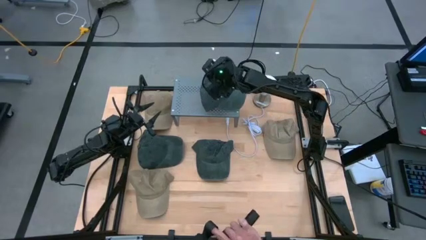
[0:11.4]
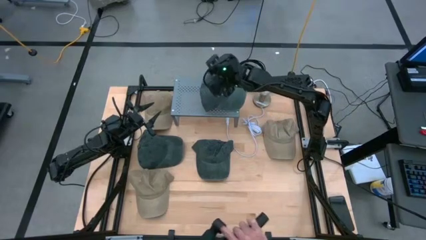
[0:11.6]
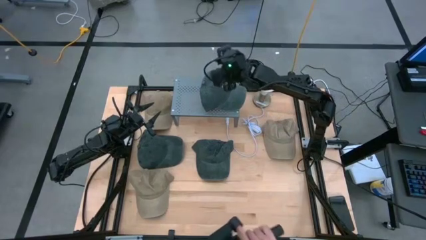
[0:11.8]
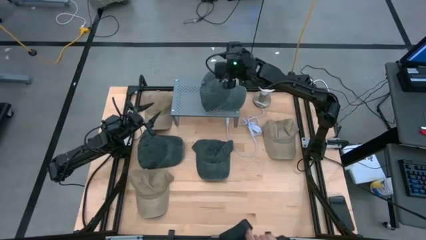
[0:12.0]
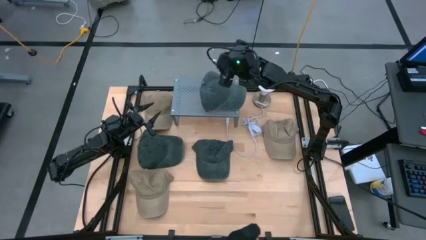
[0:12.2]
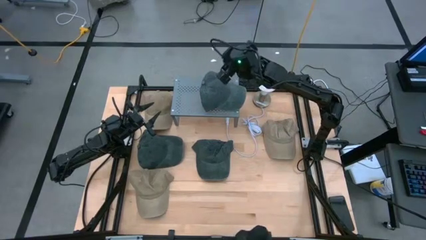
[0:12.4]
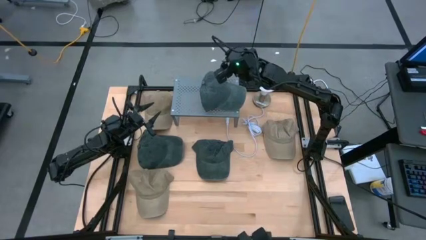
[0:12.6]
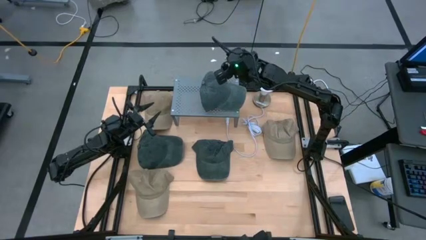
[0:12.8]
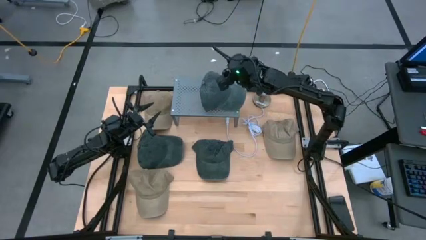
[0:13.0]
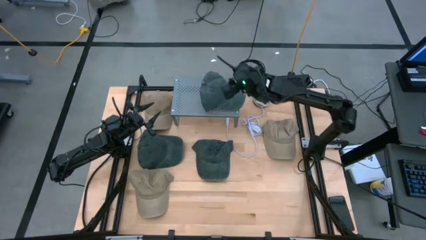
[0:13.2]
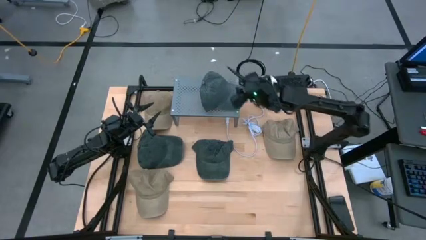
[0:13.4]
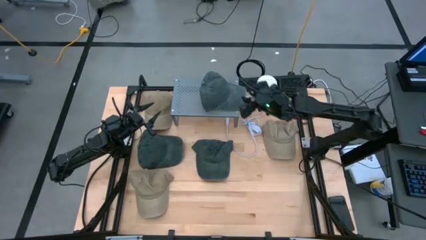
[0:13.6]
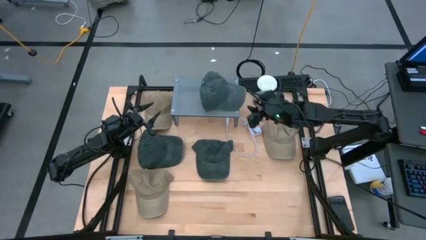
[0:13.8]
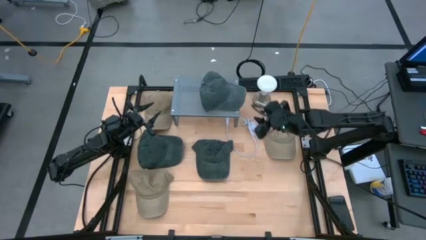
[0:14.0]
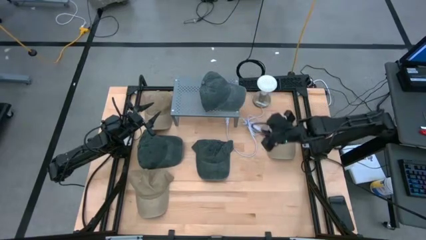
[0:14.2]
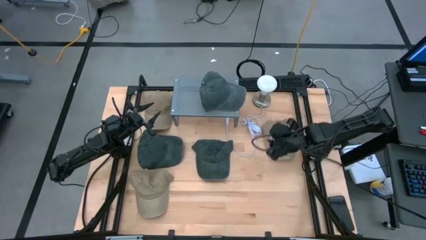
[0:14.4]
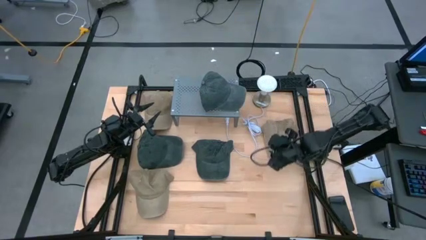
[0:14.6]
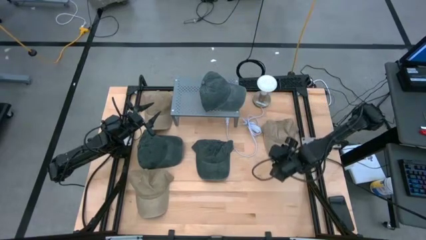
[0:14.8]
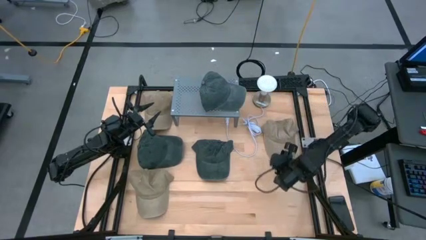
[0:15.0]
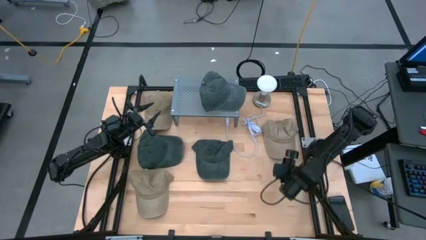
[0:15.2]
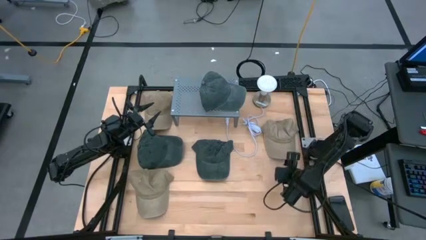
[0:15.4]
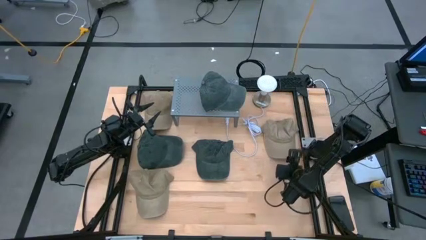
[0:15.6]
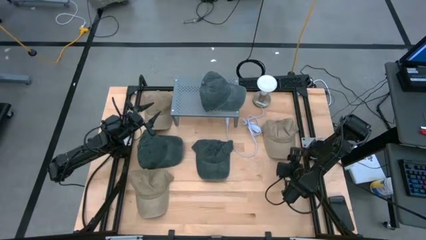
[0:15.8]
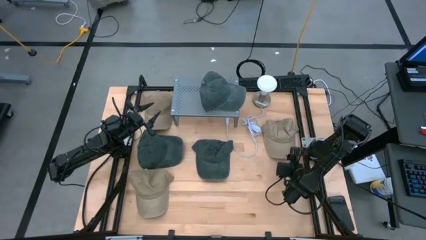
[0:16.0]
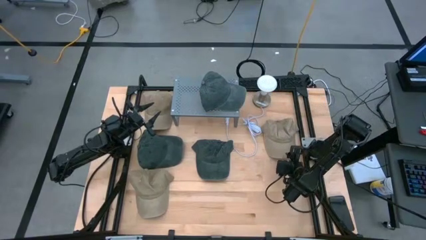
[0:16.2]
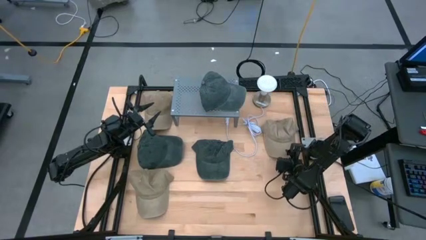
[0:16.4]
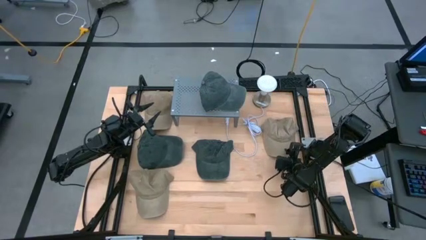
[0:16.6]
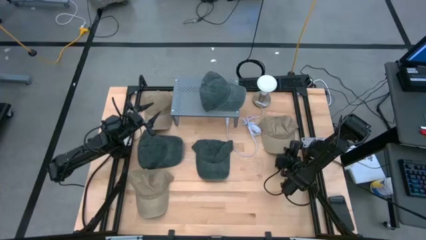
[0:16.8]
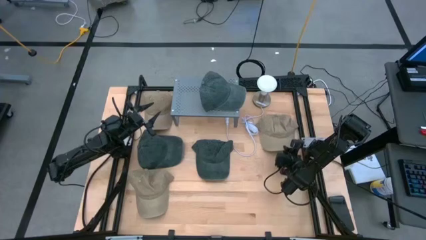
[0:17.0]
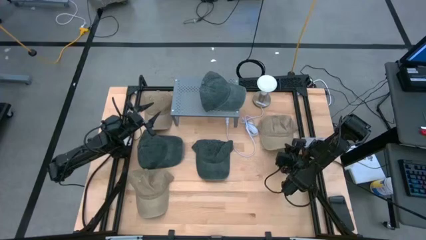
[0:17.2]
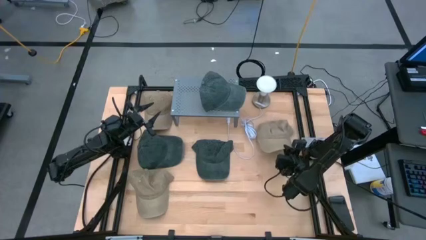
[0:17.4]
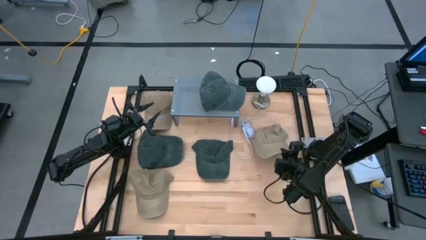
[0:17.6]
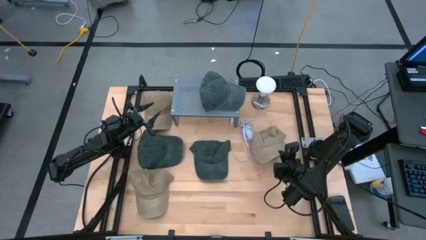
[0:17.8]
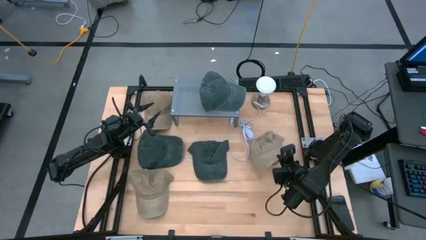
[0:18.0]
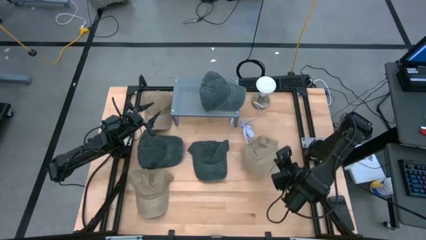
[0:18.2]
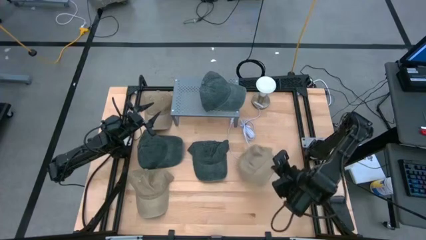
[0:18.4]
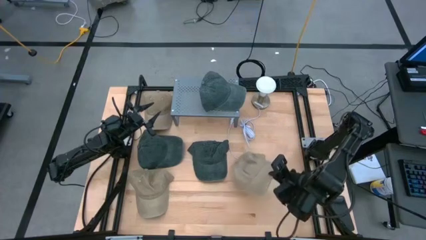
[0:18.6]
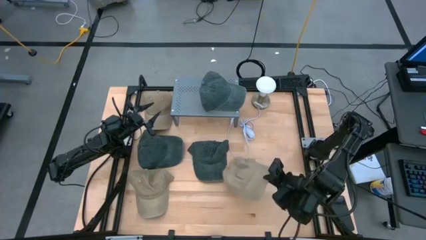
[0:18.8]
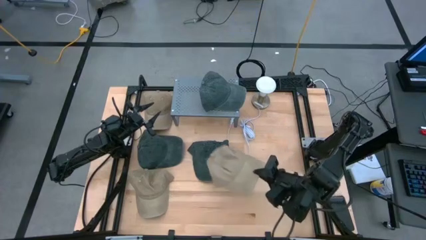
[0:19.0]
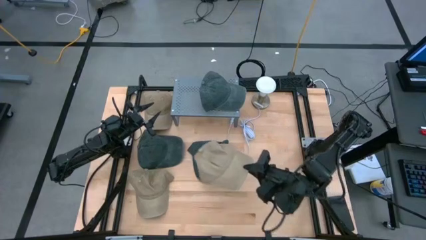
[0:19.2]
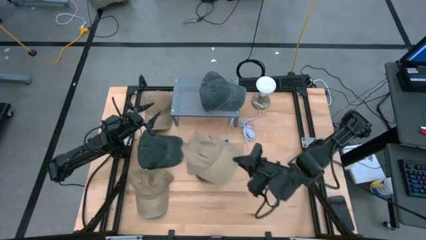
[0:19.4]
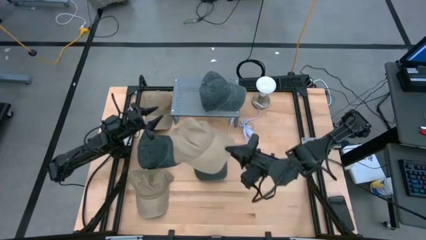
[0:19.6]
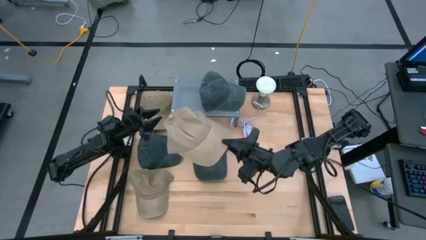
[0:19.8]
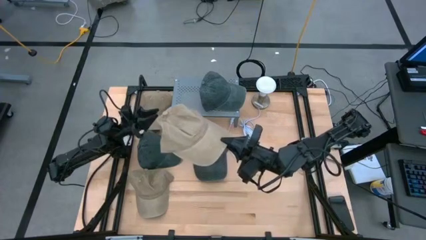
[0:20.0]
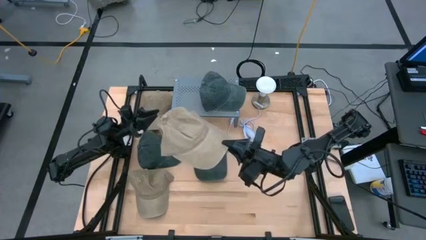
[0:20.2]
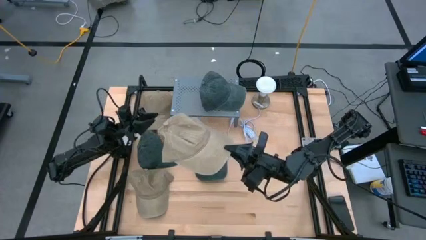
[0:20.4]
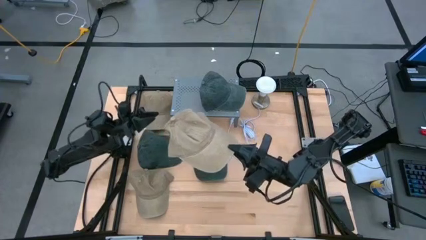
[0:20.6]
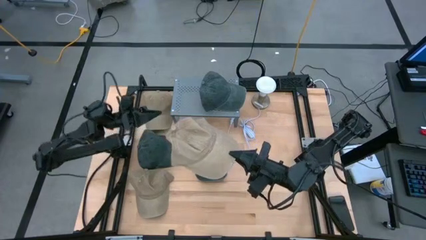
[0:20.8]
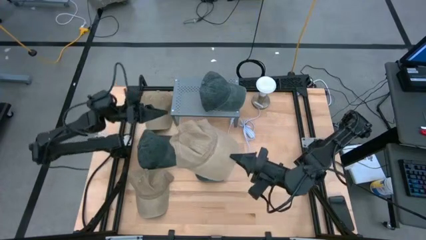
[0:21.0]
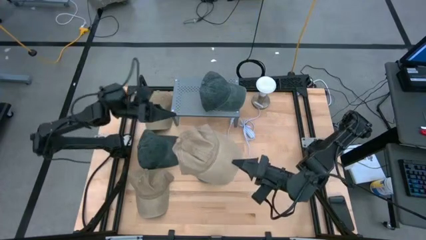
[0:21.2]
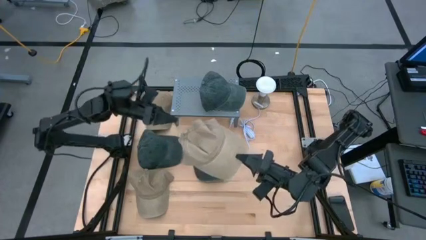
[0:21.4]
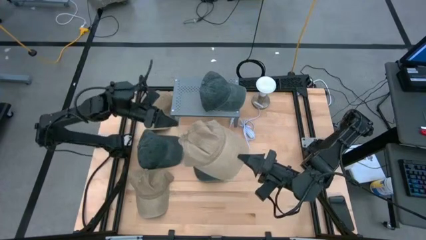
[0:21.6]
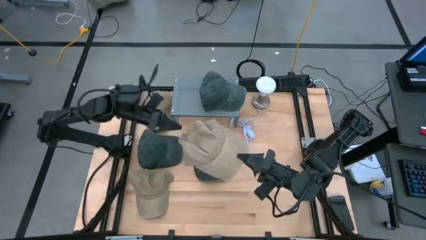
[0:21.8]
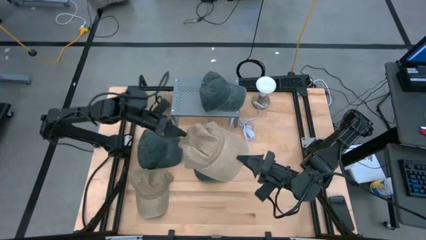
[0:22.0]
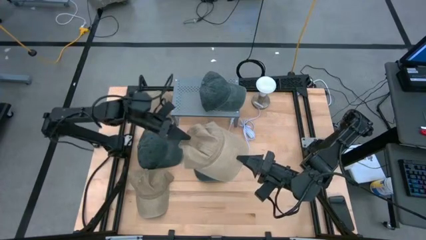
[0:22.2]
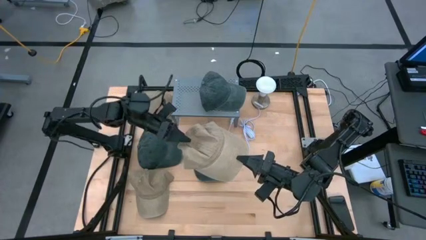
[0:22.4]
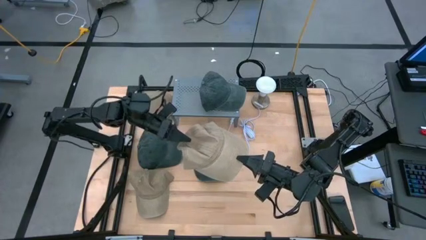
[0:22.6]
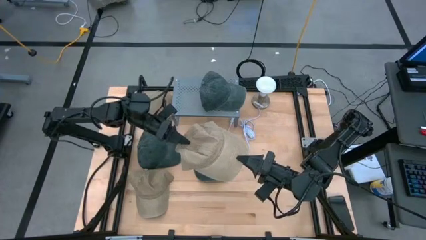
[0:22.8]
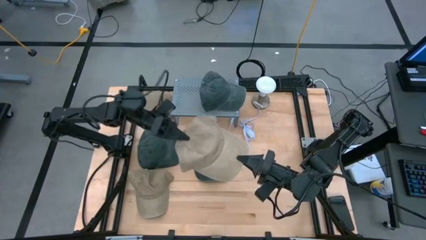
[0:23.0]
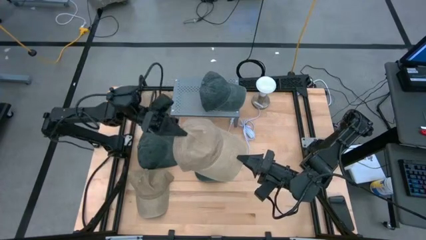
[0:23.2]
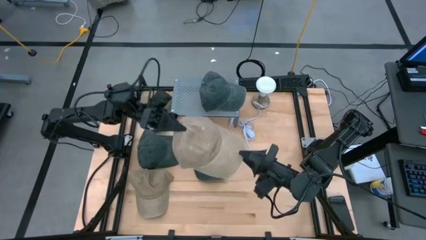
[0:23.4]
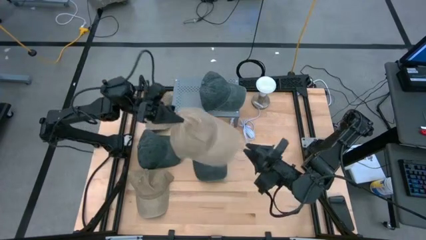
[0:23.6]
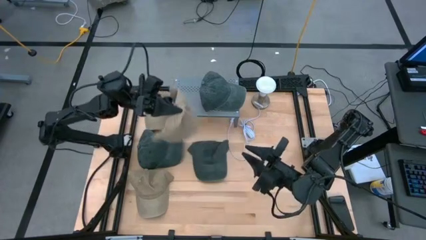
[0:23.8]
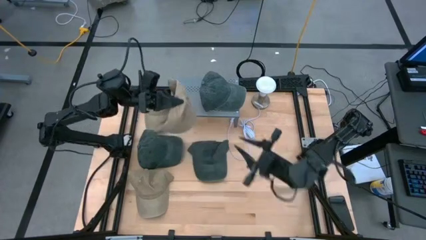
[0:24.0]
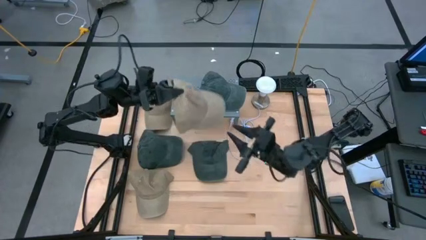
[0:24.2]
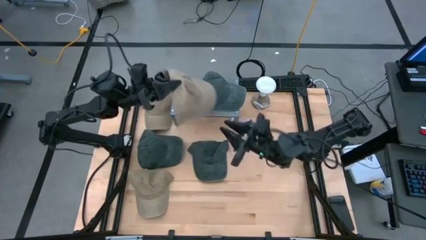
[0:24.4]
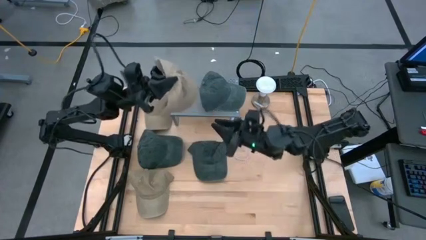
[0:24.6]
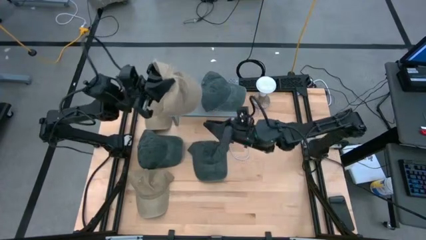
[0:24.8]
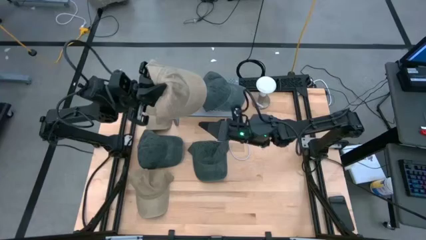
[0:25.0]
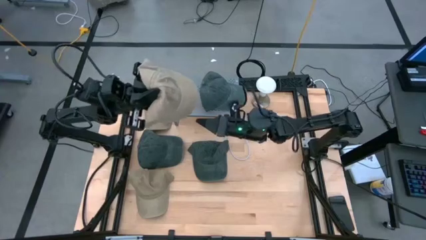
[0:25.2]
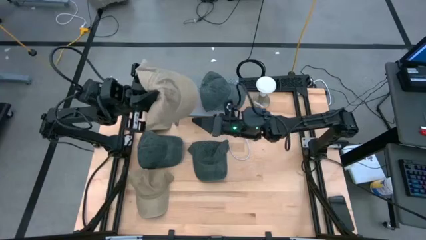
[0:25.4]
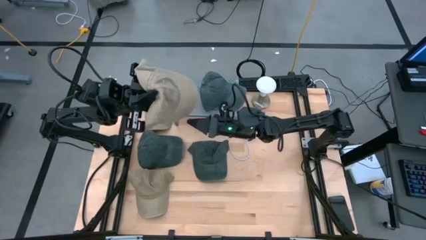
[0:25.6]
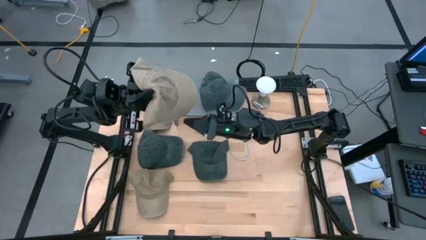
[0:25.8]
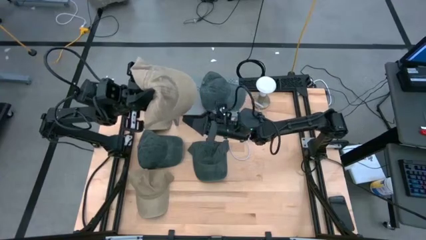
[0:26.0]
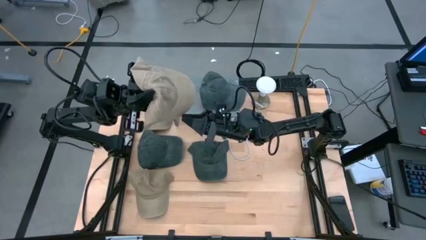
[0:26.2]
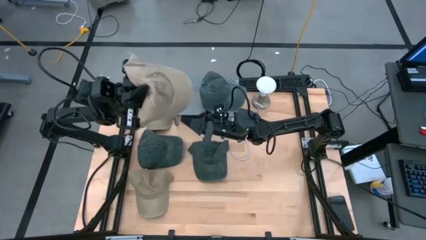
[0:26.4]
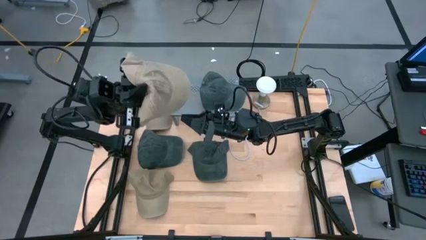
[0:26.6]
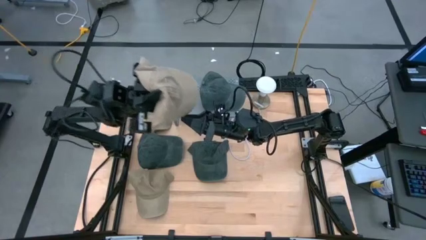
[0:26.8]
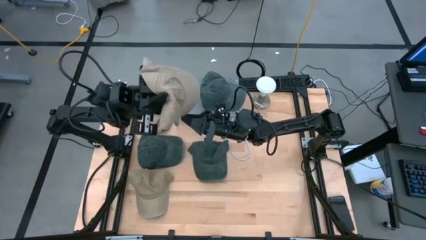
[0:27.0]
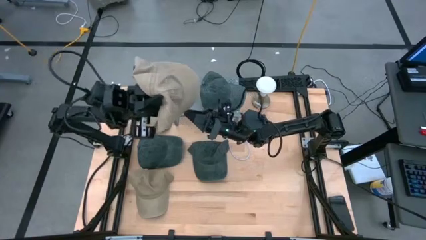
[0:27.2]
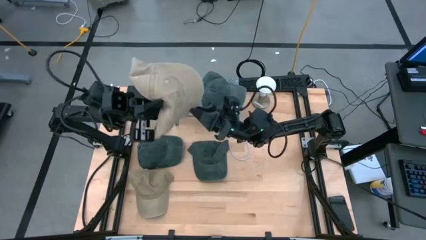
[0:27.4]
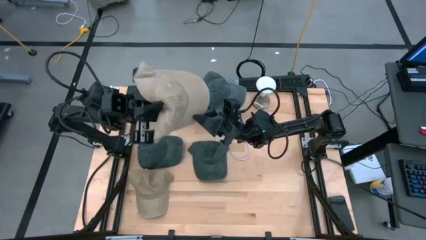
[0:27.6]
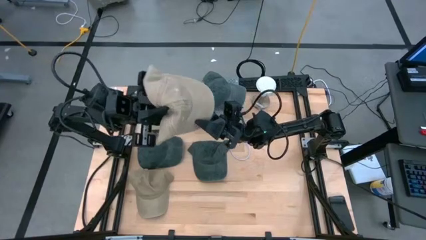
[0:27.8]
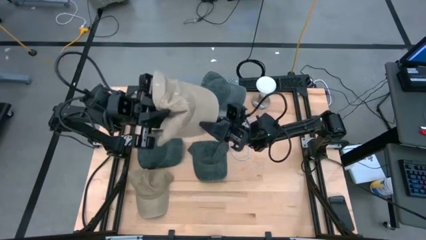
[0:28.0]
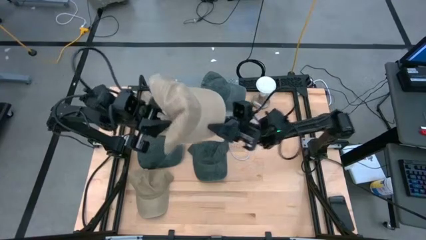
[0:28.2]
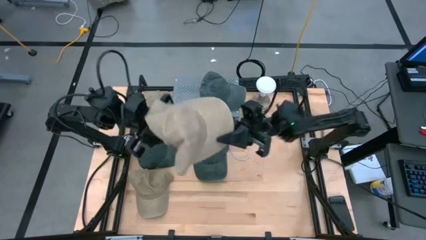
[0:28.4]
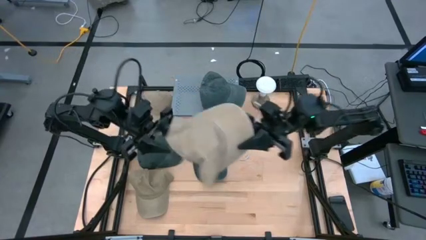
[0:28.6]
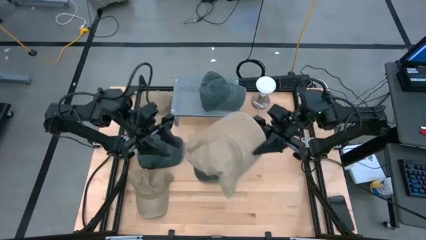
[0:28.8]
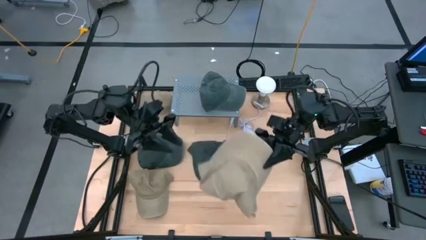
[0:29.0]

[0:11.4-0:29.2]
Task: Pick & Place hat
Put the right brown cap on the shelf
